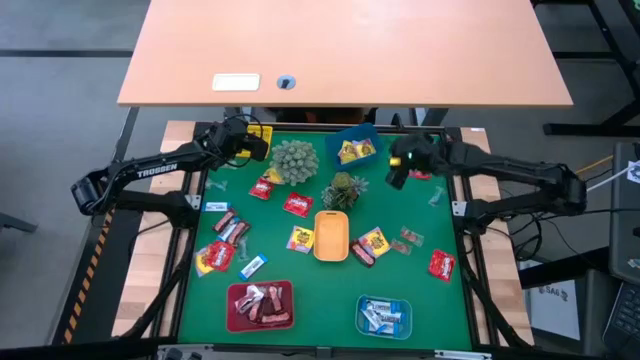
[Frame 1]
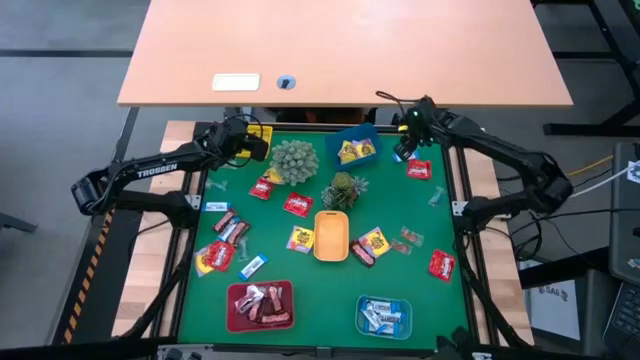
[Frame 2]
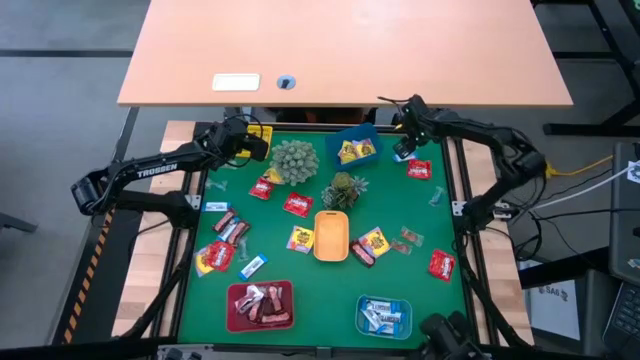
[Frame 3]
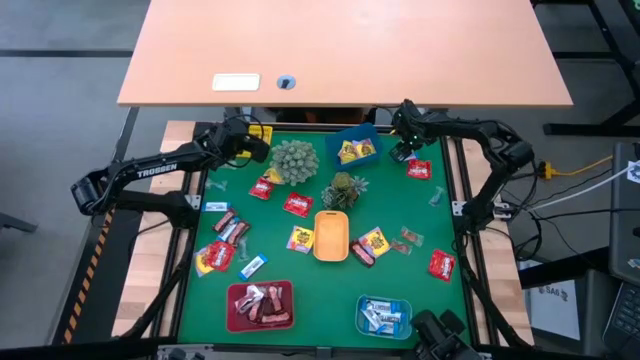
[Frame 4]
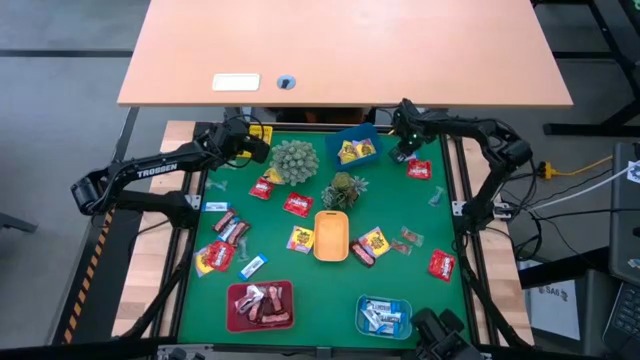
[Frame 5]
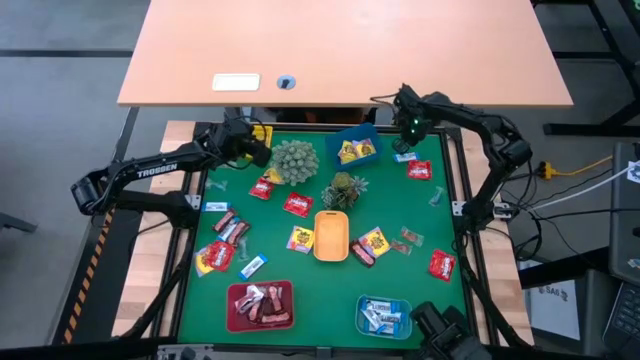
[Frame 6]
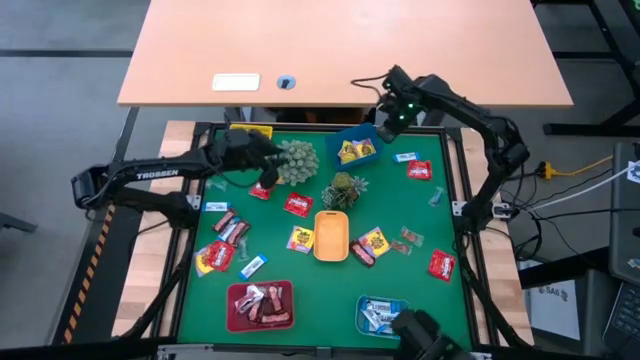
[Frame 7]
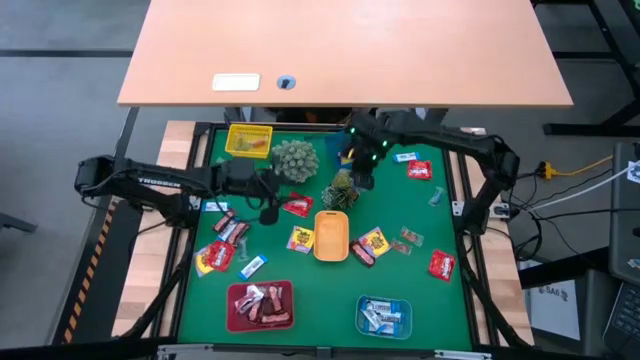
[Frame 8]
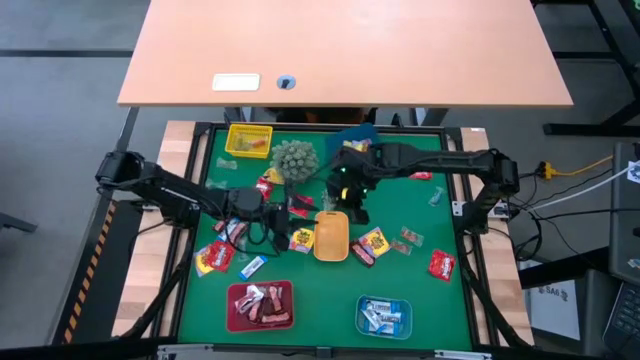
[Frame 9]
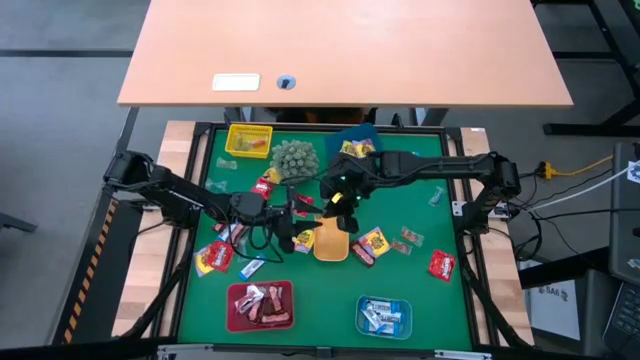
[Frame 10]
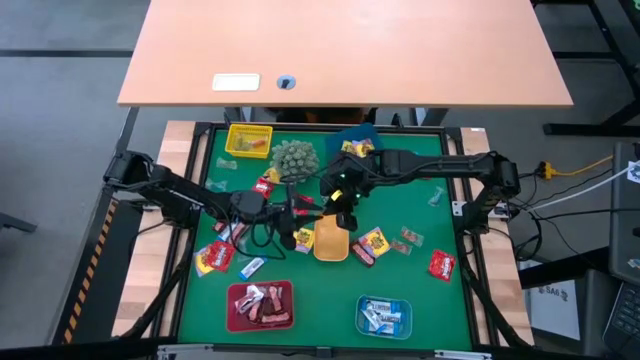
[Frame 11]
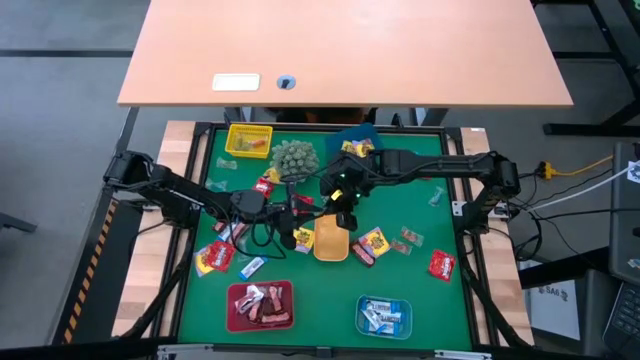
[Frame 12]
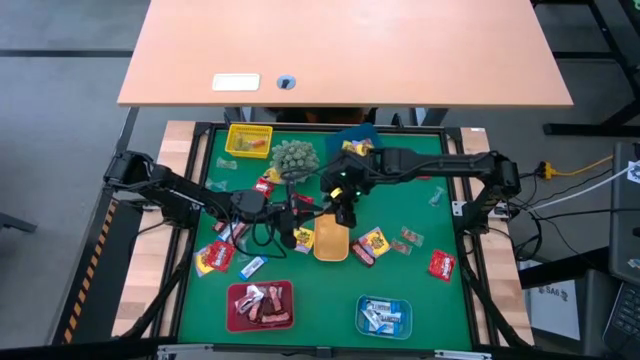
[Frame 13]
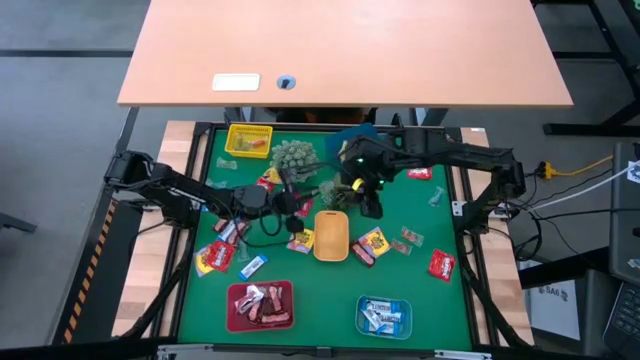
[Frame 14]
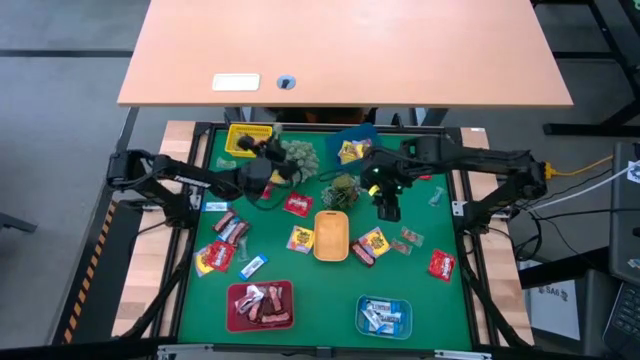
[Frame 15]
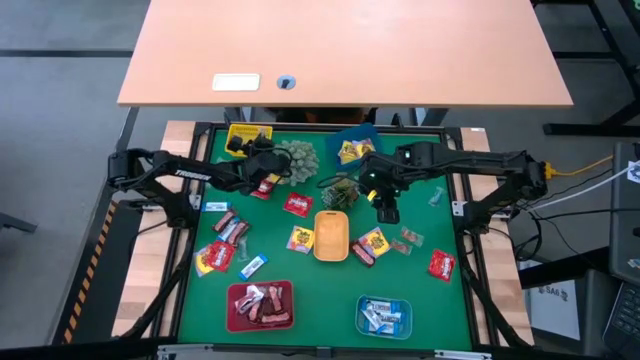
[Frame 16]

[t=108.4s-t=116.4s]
Task: Sort candy
Put the green gummy into the yellow bin

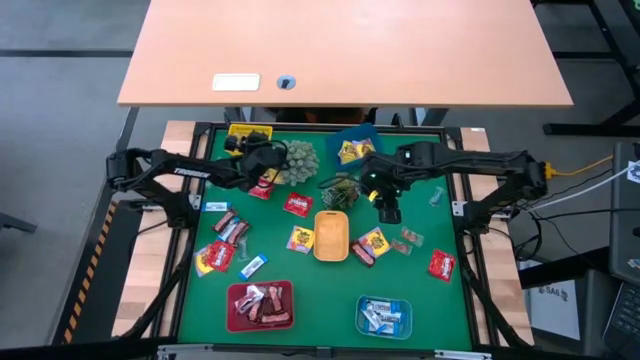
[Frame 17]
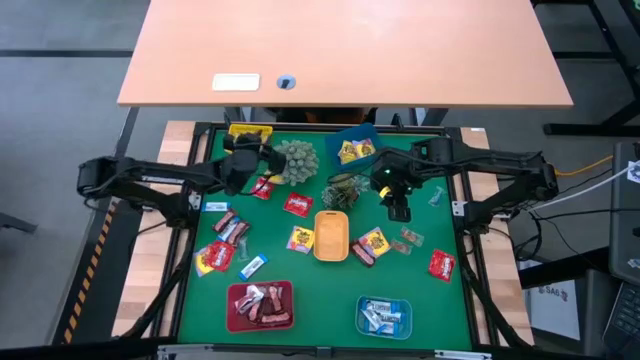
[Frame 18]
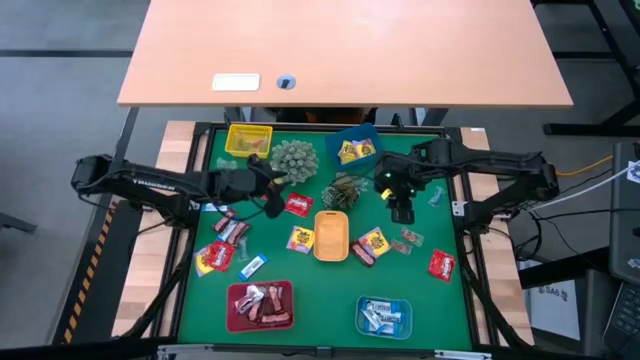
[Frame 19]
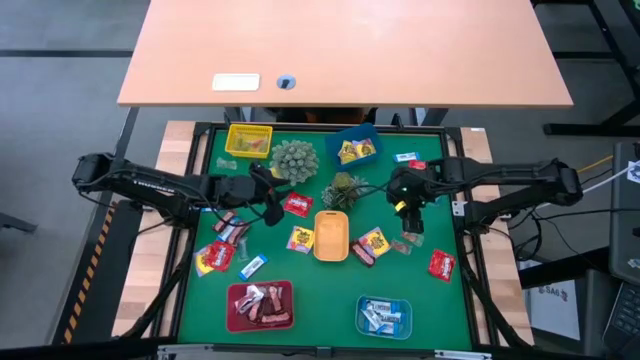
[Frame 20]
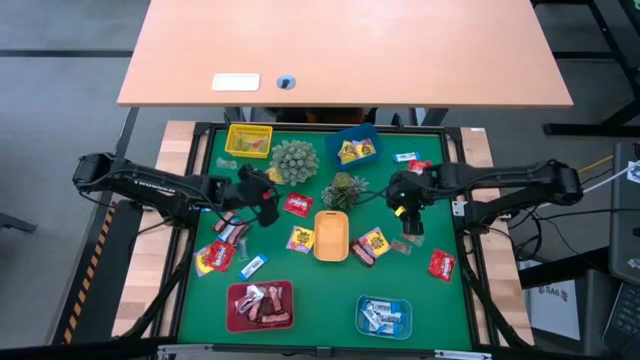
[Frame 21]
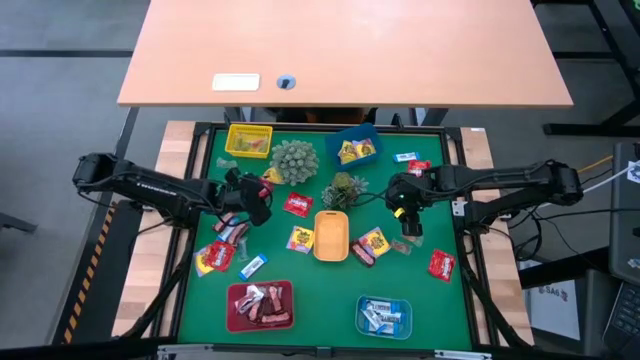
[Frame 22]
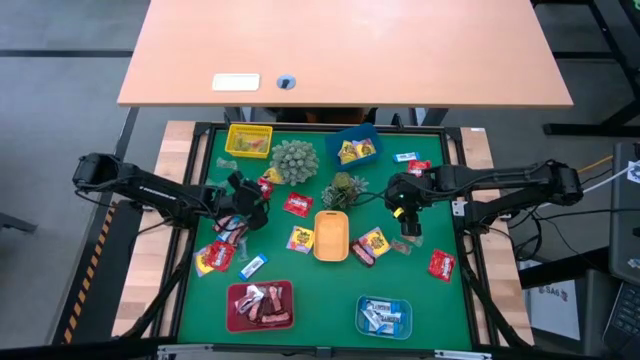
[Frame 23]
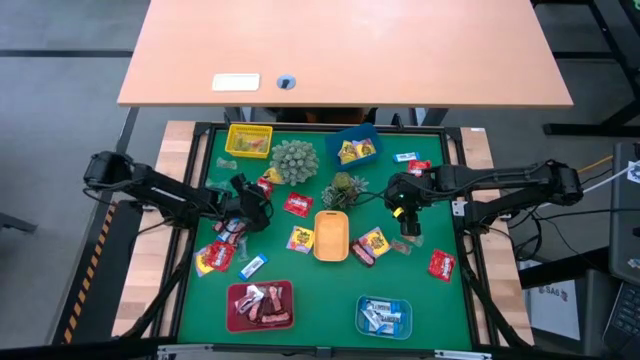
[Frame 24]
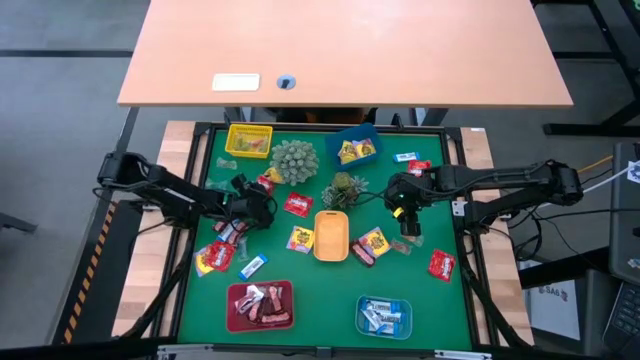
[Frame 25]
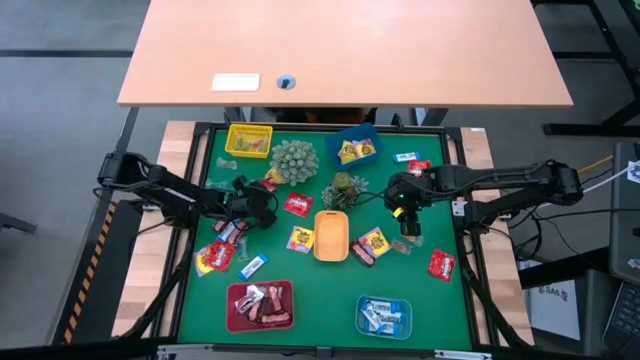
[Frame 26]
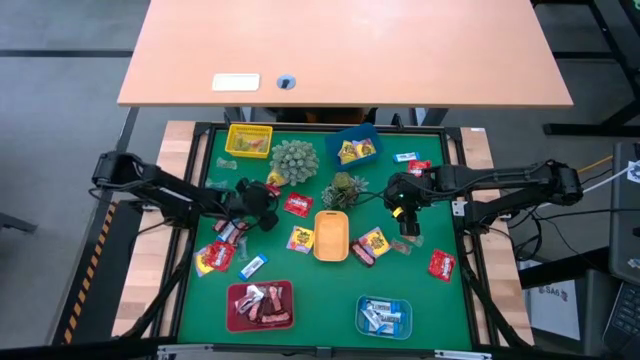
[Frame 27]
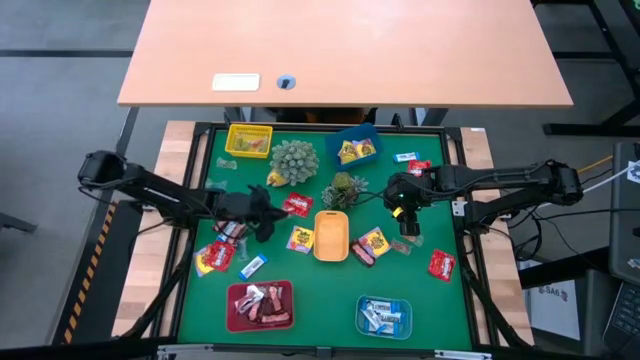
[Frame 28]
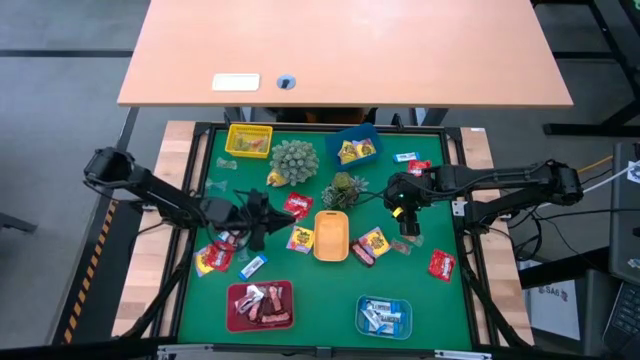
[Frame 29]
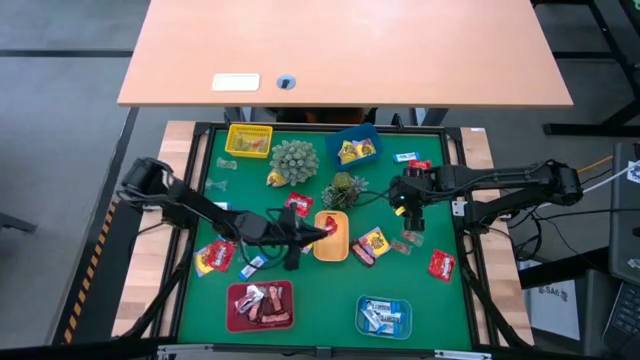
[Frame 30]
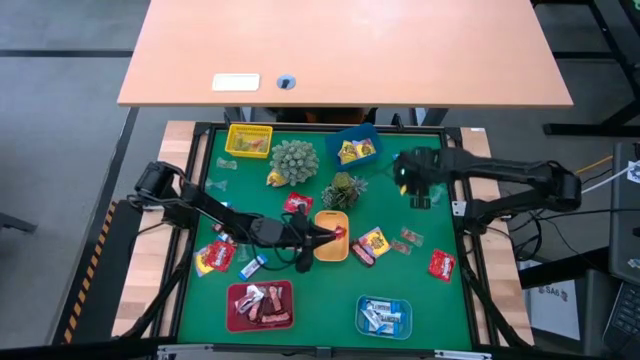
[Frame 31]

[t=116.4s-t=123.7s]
Put the red candy into the light orange bin

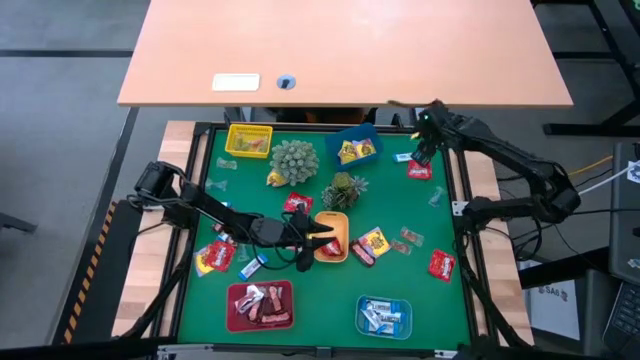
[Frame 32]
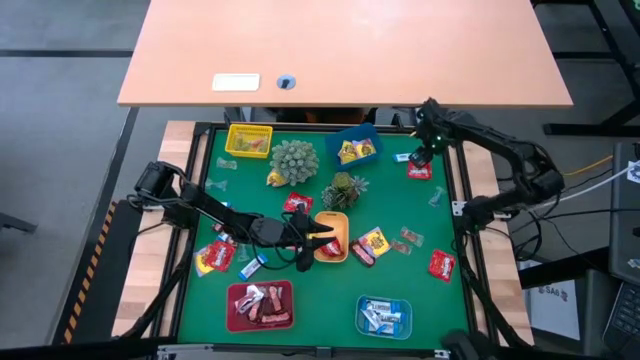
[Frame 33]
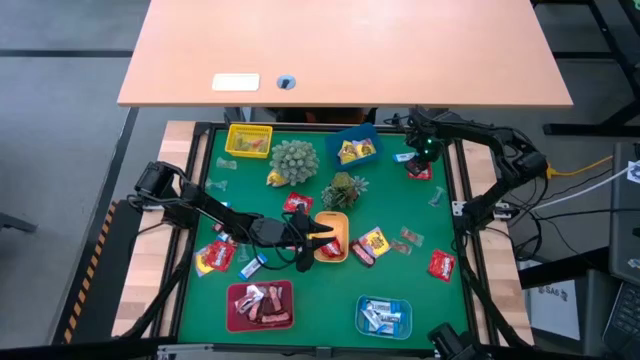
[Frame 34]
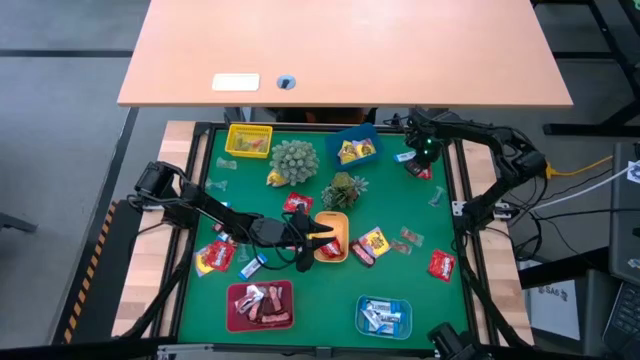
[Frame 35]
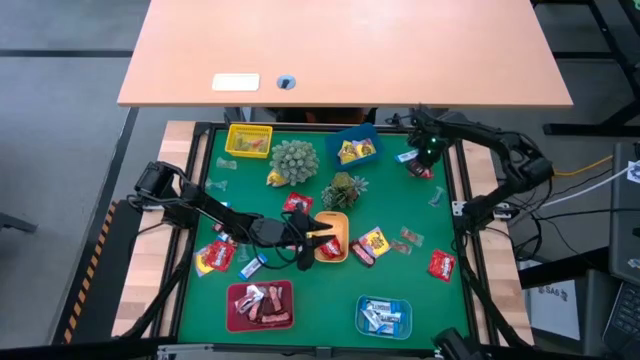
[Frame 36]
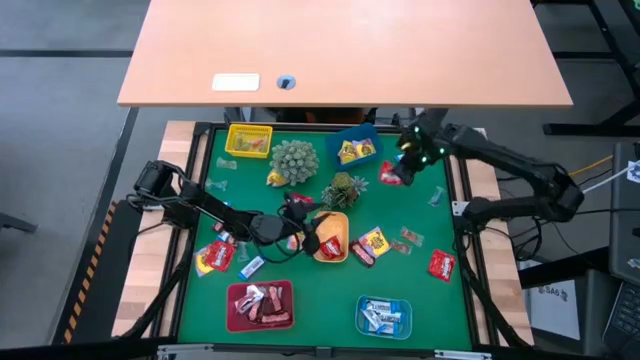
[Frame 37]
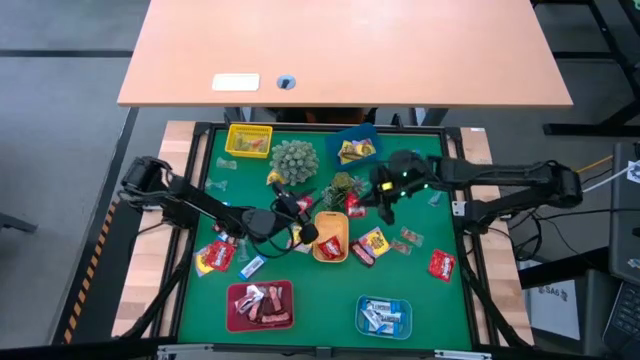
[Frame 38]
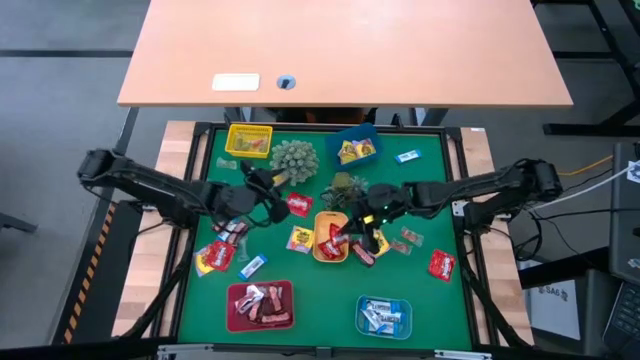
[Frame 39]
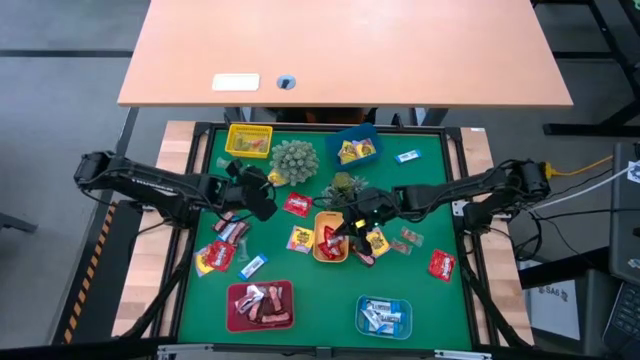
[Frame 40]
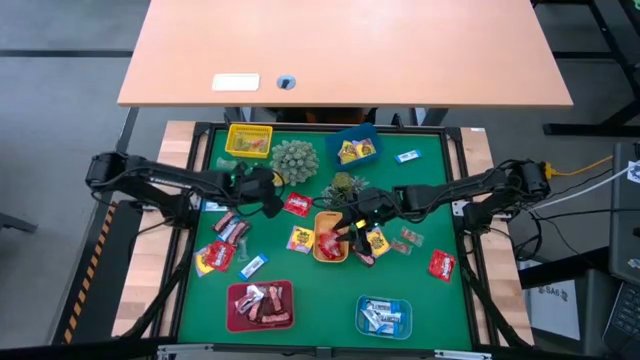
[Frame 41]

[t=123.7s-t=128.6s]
Put the red candy into the light orange bin

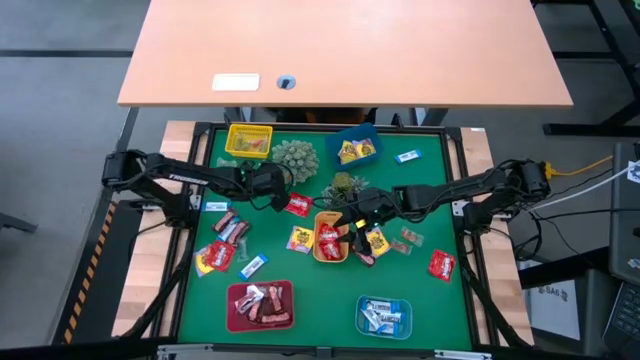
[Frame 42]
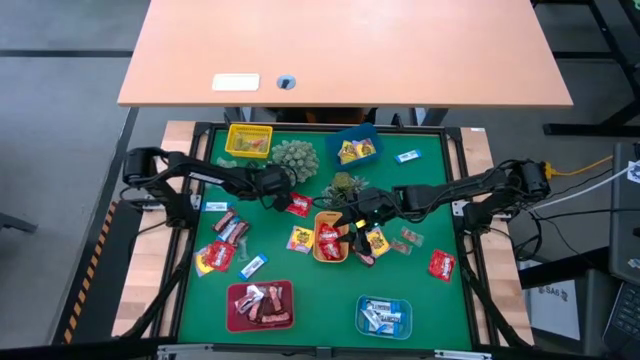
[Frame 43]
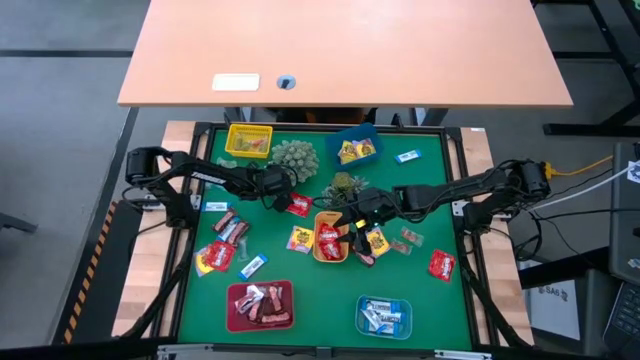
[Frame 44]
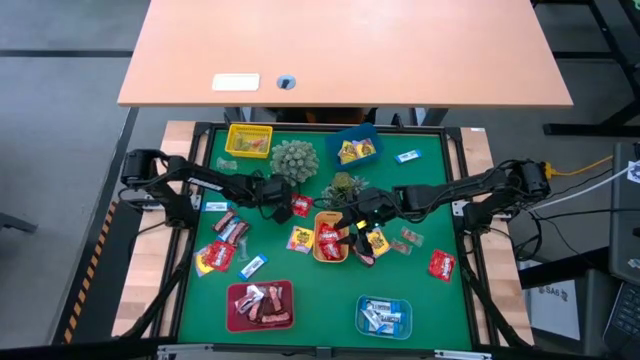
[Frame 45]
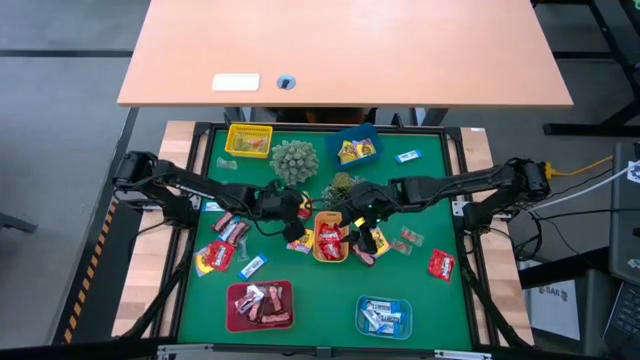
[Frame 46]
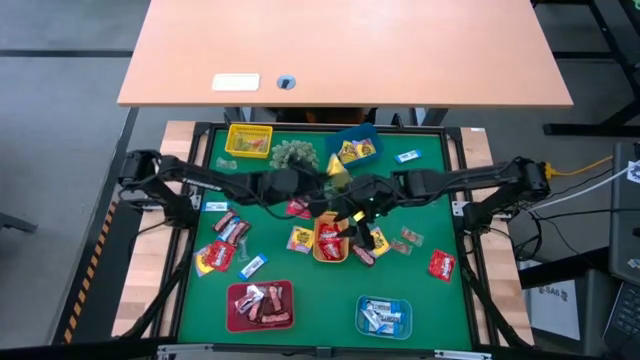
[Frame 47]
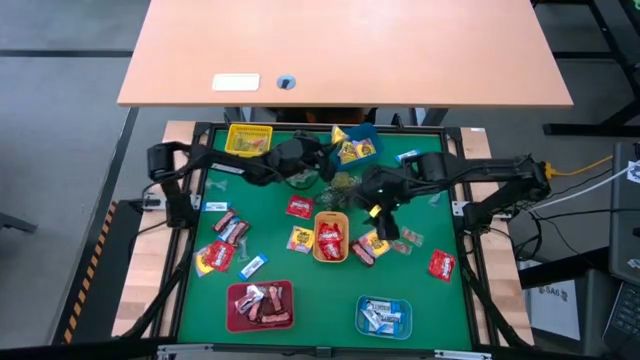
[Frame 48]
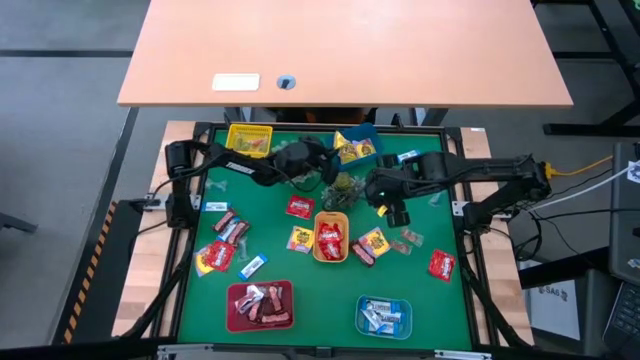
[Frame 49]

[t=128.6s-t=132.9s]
Put the yellow candy into the blue bin
